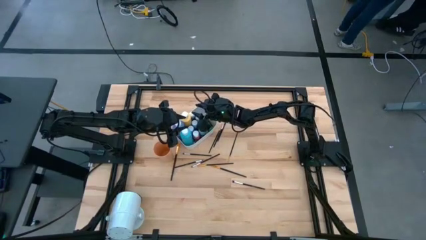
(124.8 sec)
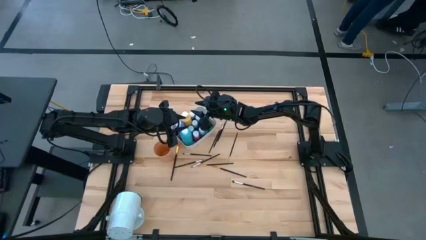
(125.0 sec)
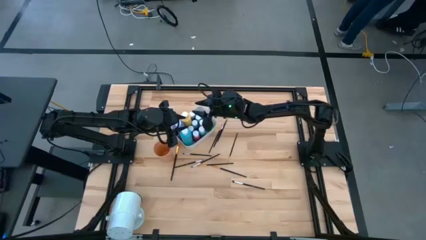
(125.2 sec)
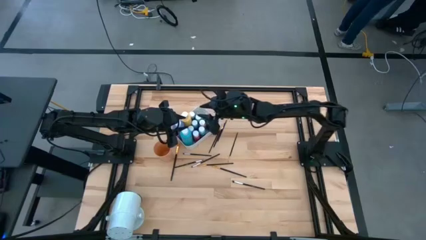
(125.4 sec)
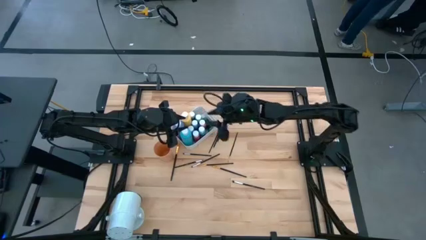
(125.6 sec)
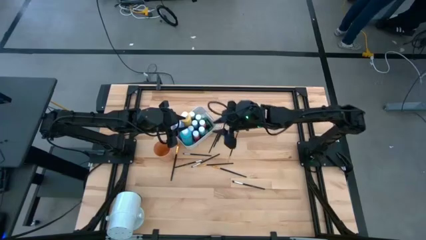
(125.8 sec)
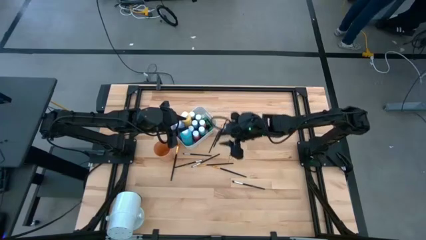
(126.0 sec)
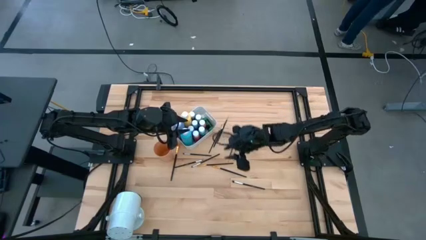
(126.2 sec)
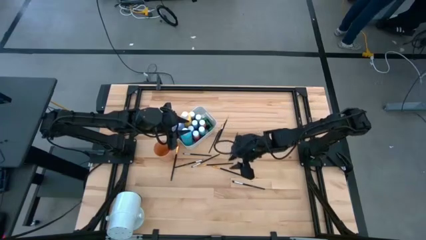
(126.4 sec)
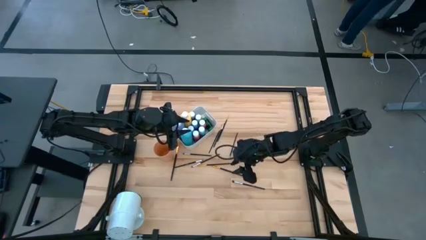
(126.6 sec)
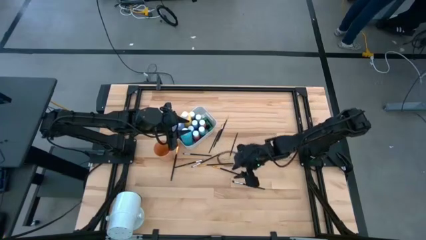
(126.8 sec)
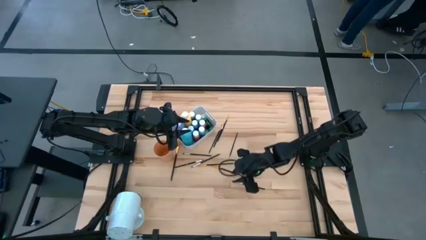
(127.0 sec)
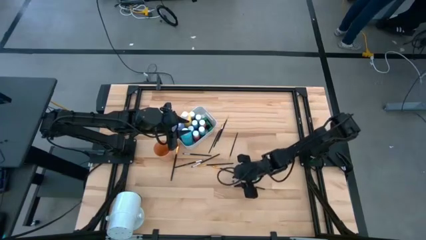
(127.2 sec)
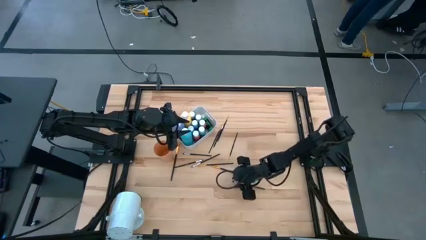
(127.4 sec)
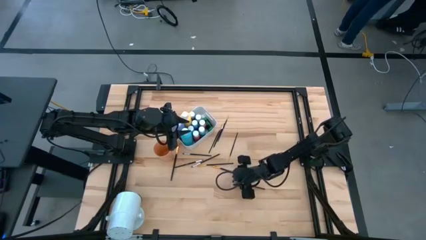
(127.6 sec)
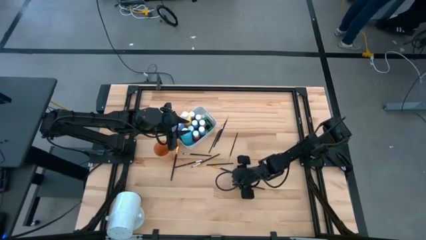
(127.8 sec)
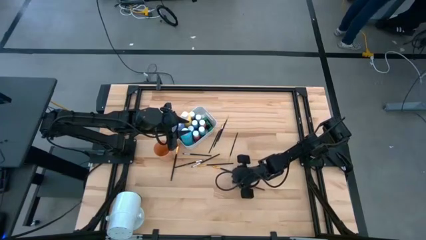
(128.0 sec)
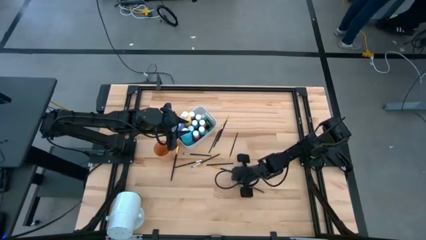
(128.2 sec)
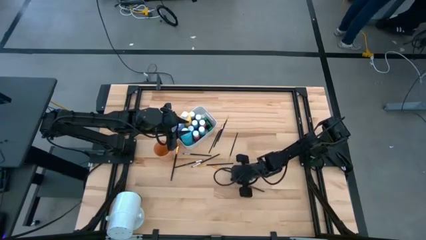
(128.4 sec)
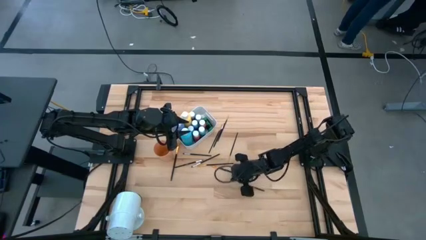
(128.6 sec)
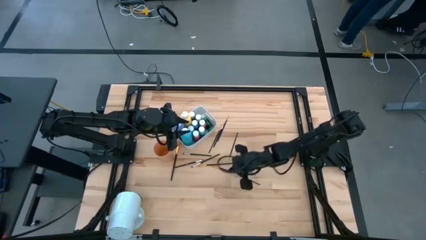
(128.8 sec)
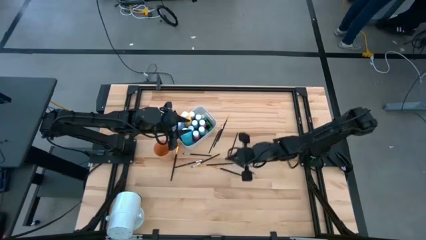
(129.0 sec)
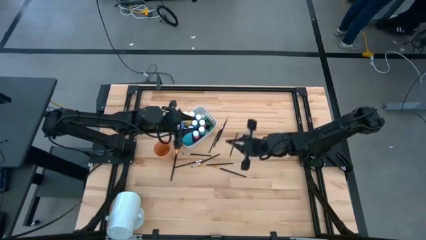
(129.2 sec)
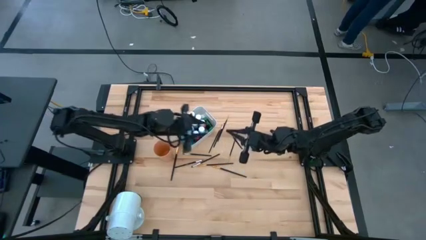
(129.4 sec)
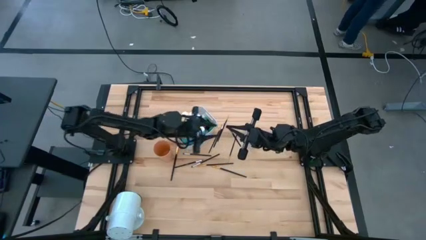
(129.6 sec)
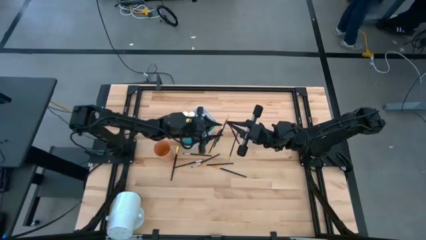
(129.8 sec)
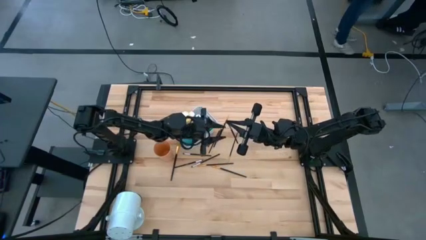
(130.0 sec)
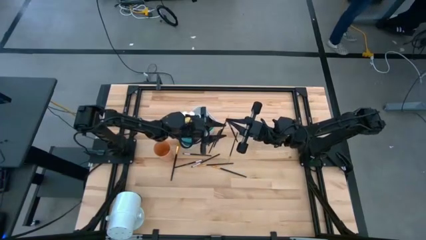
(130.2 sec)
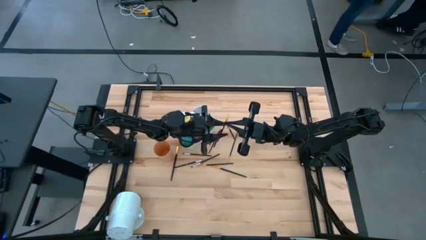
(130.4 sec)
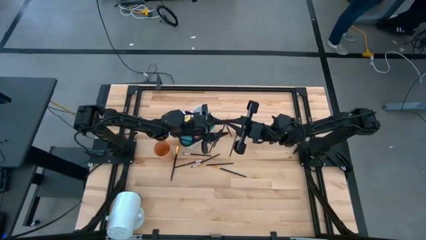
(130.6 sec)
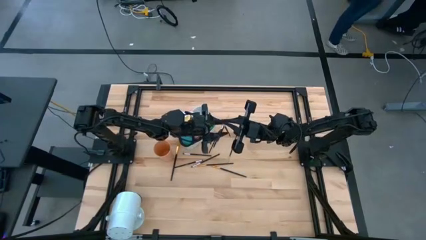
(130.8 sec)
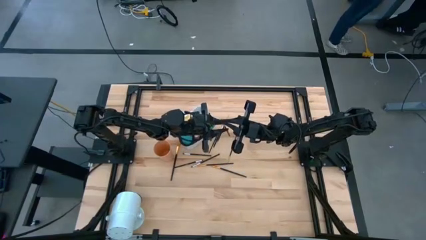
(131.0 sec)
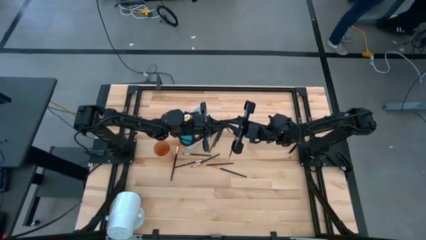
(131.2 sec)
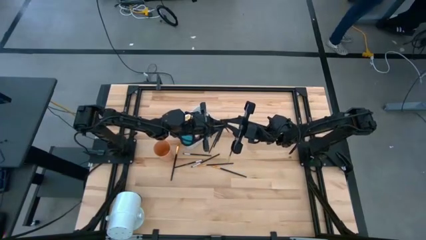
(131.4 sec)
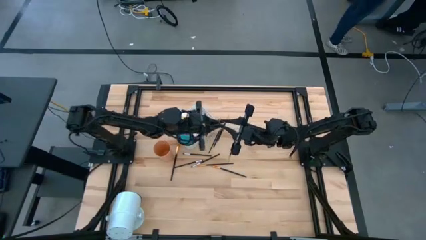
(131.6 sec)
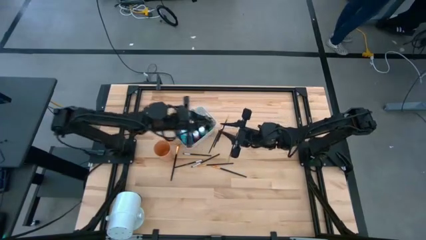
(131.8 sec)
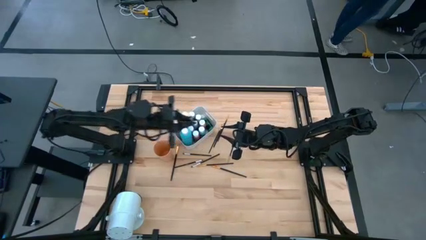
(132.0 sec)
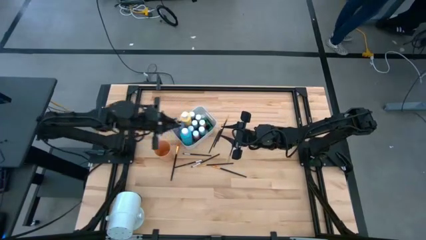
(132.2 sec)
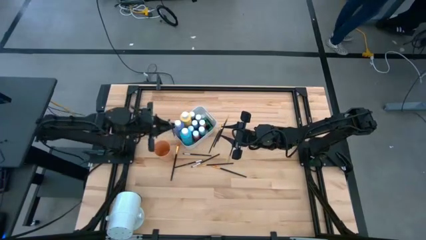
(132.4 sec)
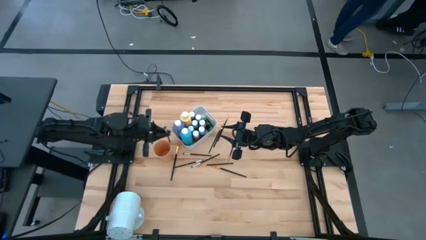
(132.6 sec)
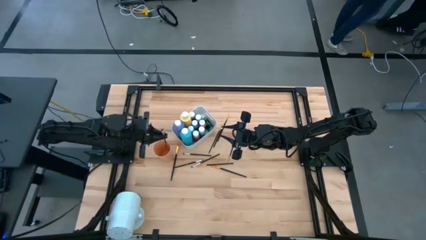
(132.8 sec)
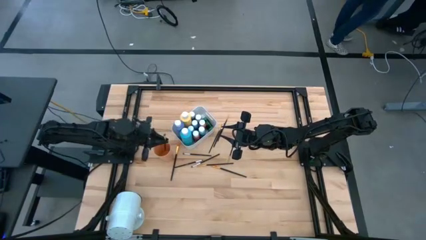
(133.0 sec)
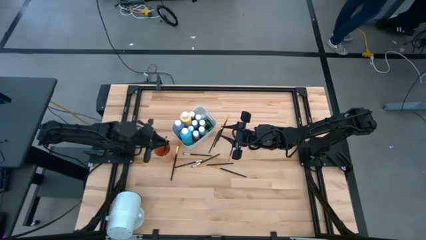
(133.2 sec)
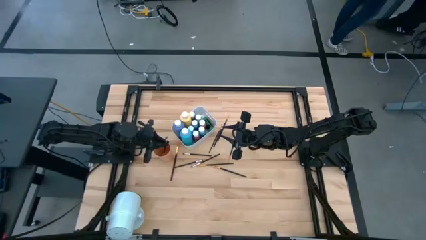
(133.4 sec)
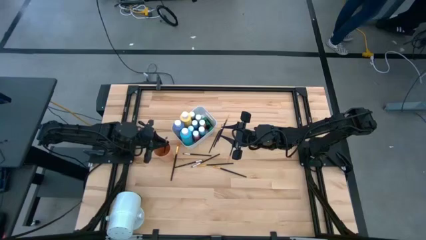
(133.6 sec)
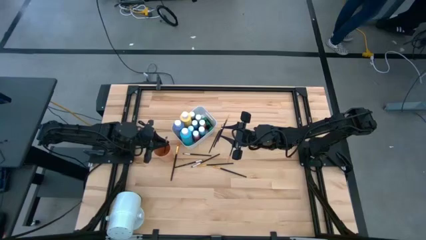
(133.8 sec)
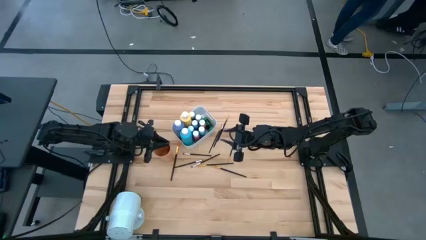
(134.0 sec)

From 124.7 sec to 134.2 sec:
Task: Pick & Place Paint Supplies
Put the black silver paintbrush into the orange cup

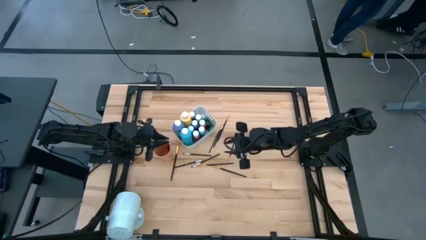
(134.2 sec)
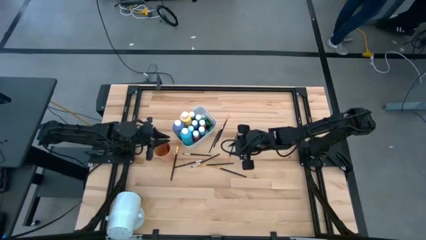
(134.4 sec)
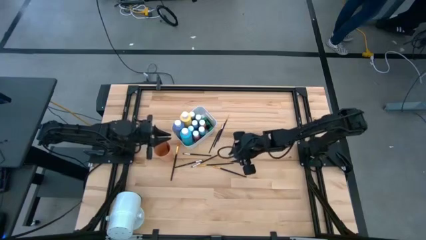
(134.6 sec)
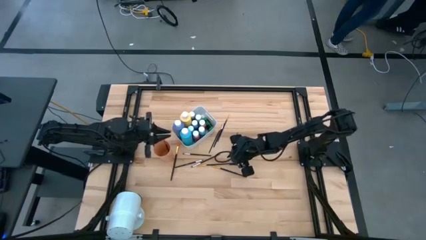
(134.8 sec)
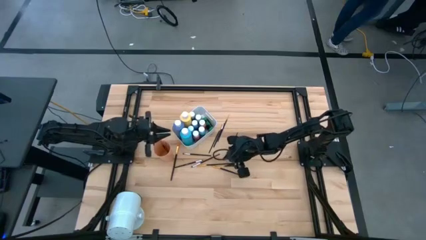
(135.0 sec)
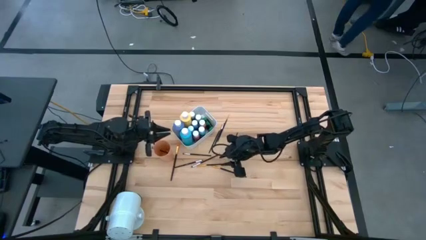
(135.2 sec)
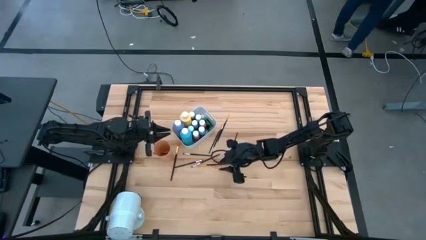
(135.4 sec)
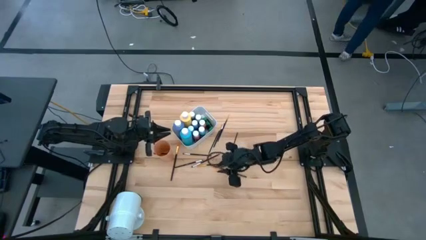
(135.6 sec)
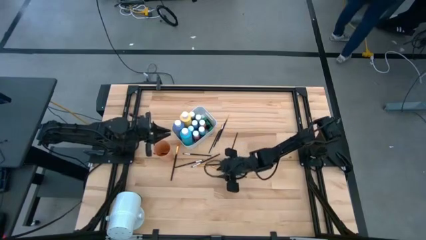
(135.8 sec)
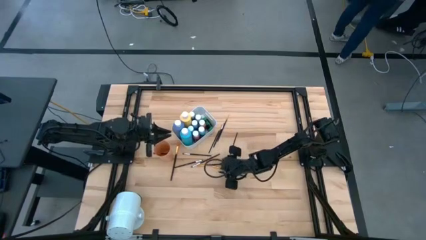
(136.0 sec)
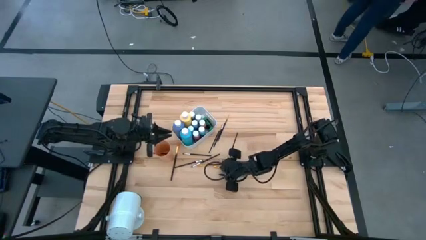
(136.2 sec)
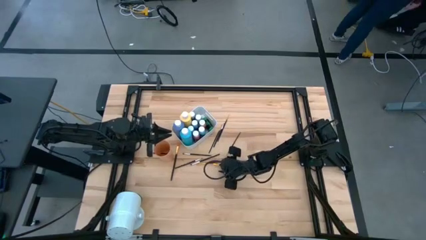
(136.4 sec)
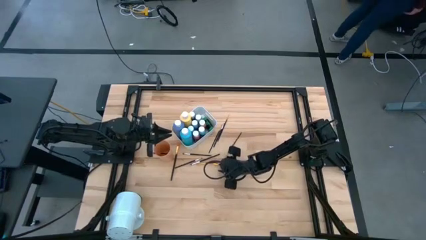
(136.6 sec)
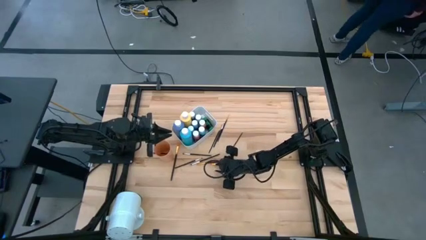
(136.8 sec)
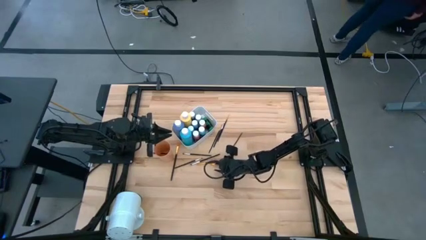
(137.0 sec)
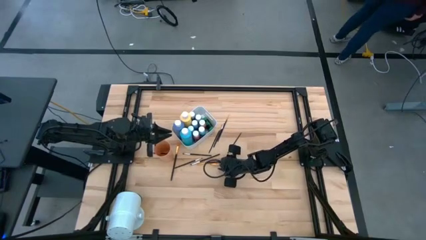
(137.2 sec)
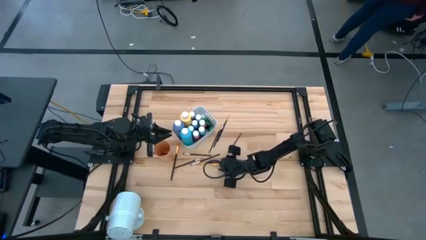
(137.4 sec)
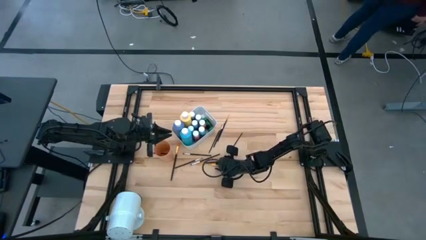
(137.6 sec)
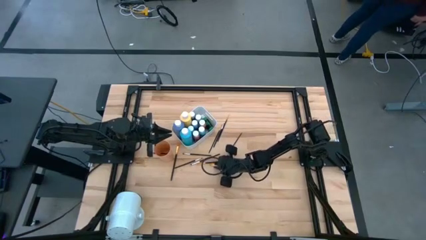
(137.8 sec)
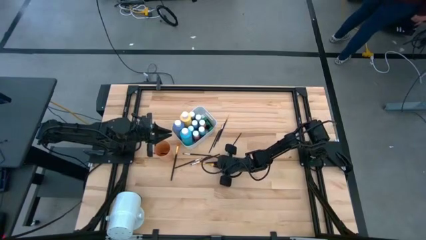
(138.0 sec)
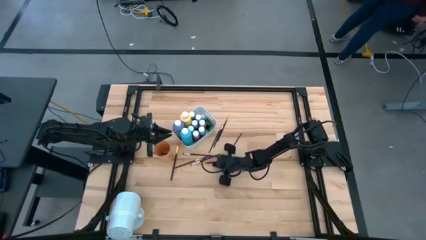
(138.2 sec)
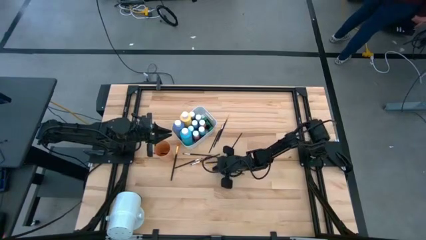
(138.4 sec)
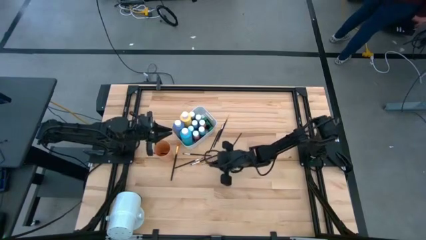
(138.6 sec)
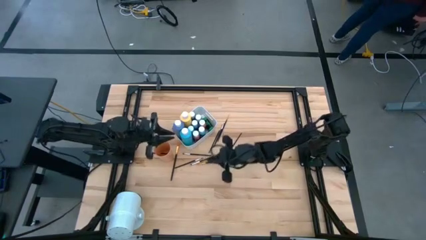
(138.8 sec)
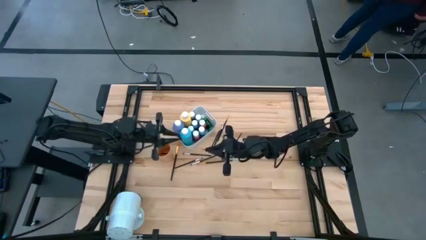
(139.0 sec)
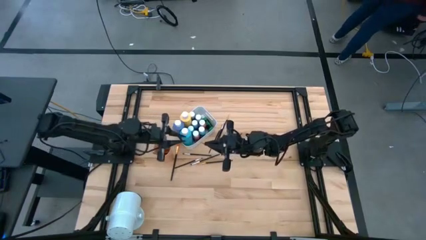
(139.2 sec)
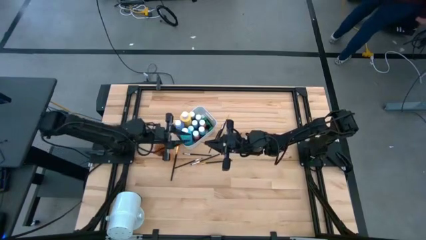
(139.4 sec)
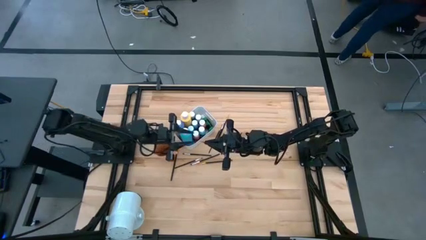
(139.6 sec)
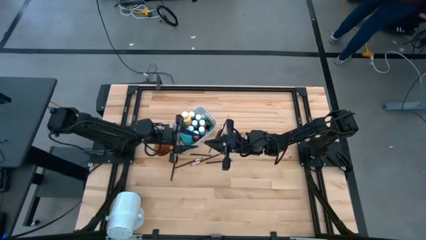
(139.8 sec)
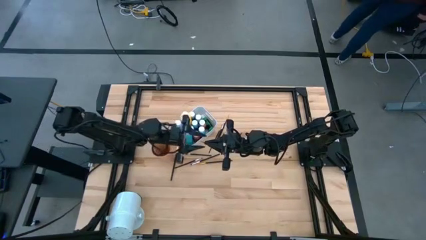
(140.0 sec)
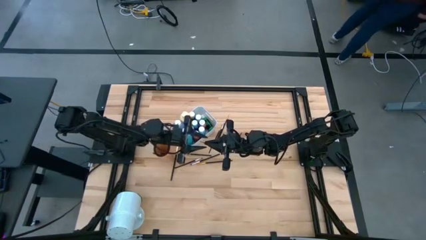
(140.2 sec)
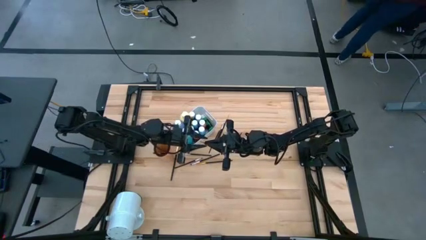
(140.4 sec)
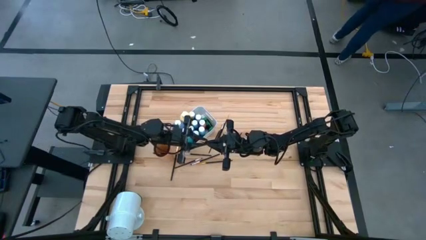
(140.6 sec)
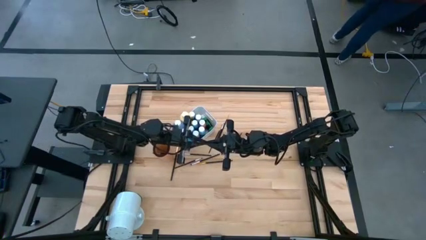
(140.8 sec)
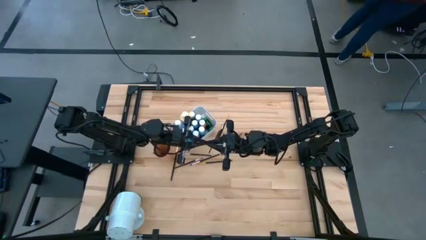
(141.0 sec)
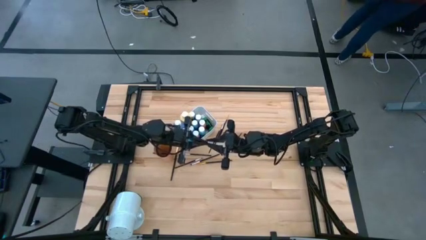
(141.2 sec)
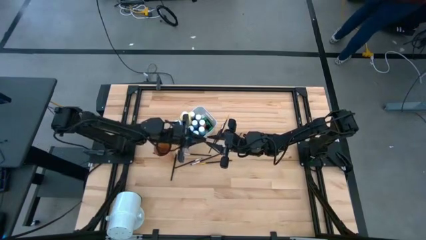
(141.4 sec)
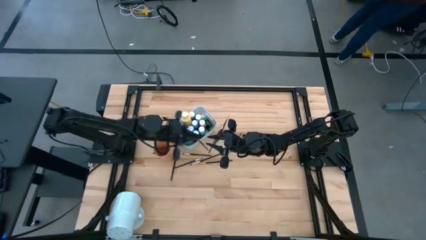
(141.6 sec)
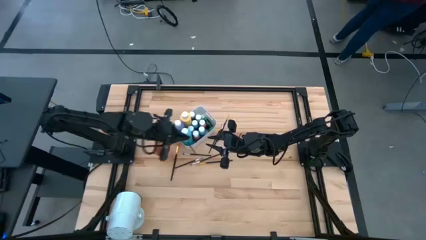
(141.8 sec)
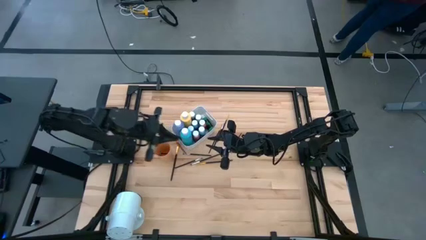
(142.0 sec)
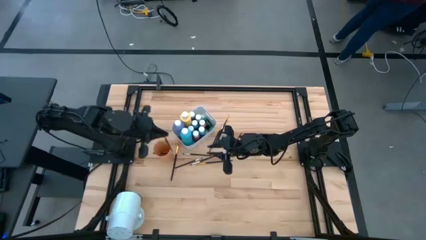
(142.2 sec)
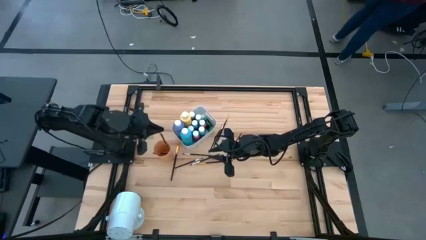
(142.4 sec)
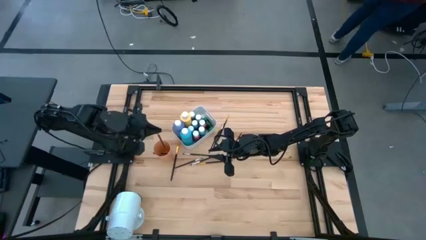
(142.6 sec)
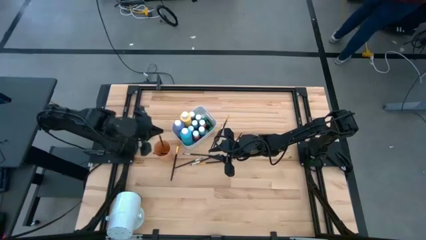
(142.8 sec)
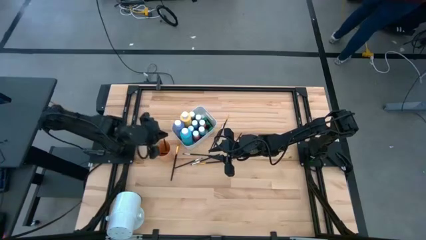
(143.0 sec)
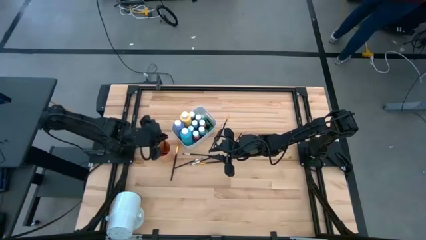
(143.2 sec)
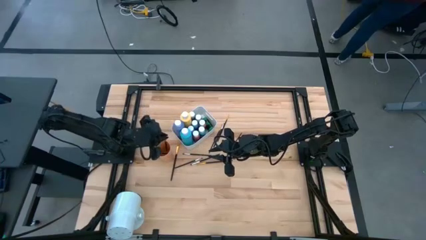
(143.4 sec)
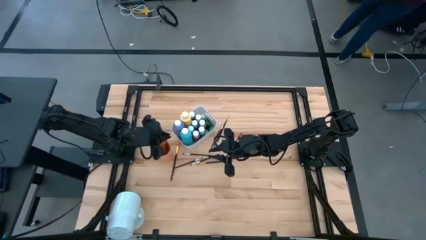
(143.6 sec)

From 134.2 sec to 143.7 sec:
Put the black gold paintbrush into the orange cup
